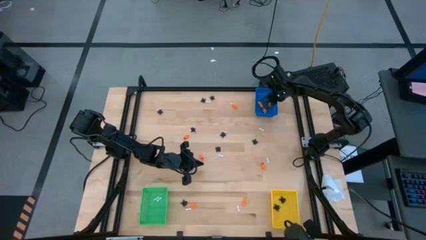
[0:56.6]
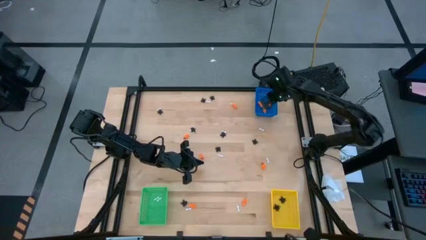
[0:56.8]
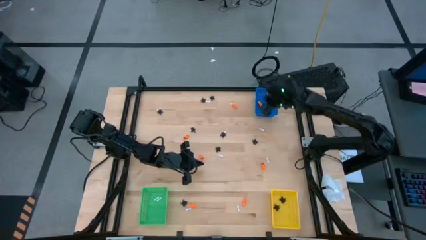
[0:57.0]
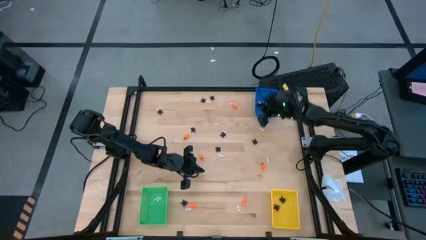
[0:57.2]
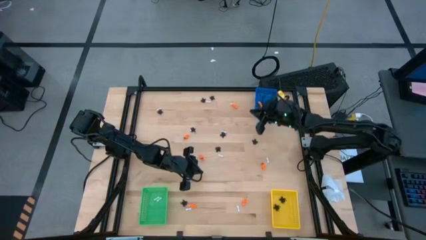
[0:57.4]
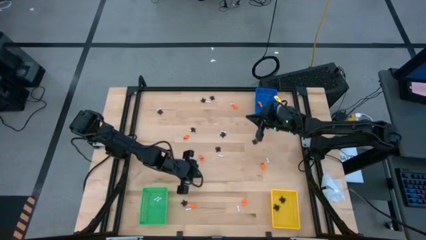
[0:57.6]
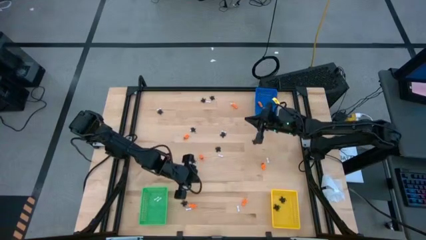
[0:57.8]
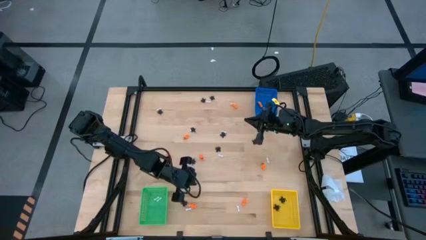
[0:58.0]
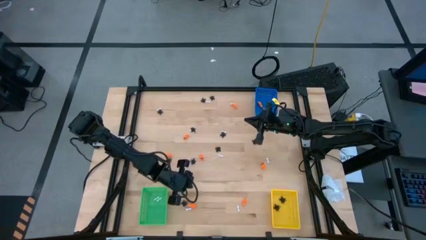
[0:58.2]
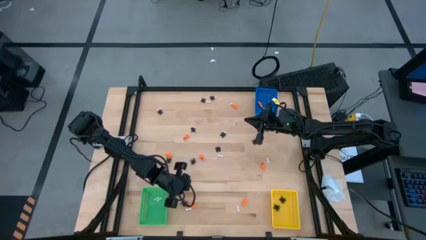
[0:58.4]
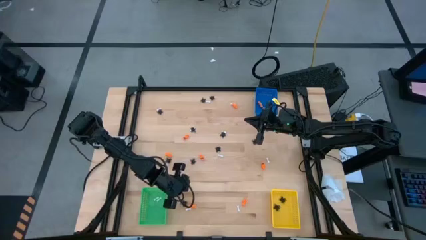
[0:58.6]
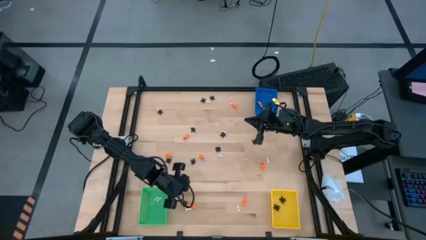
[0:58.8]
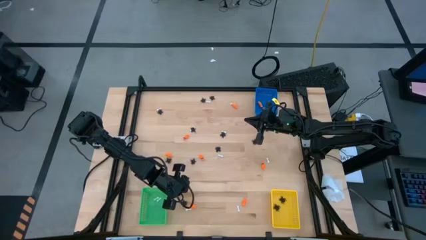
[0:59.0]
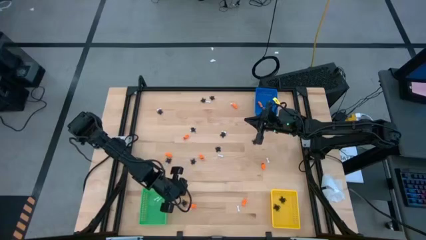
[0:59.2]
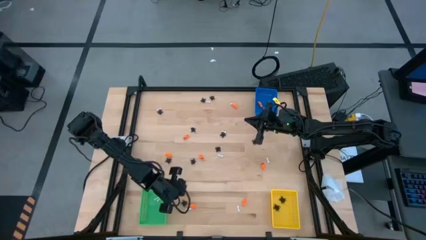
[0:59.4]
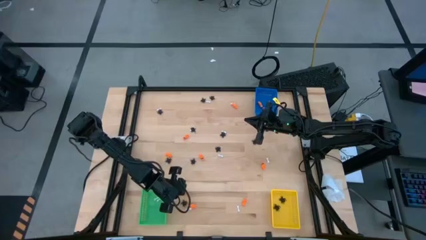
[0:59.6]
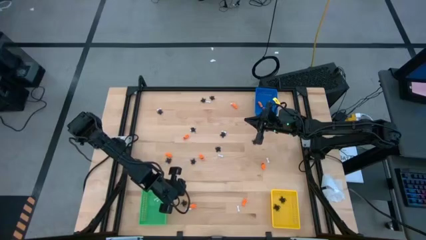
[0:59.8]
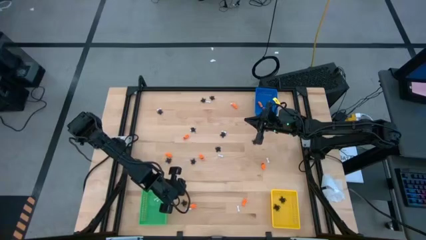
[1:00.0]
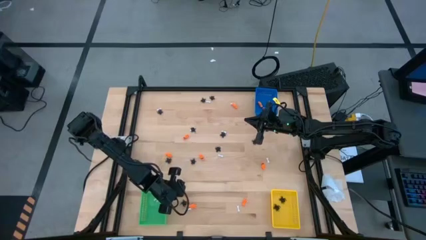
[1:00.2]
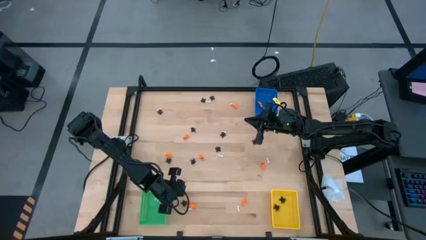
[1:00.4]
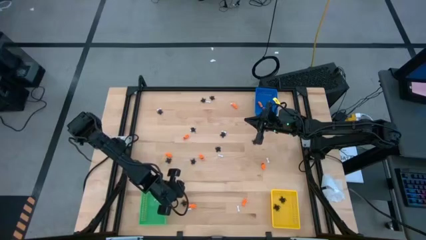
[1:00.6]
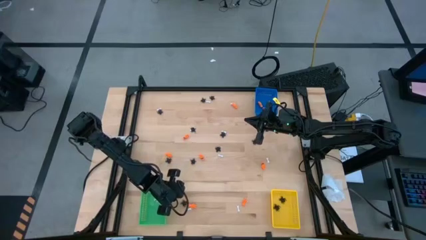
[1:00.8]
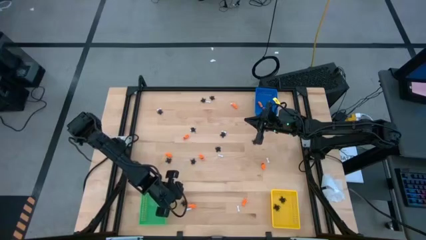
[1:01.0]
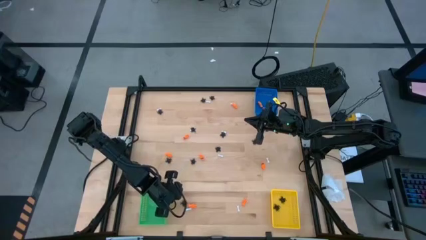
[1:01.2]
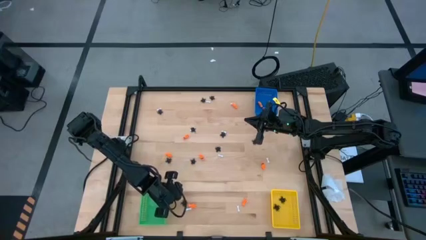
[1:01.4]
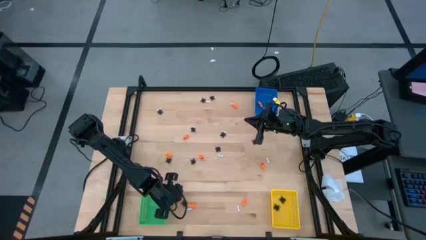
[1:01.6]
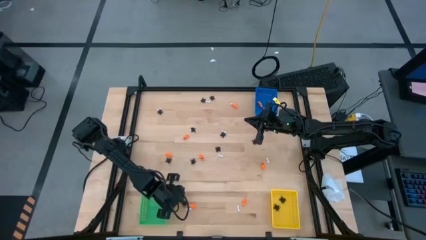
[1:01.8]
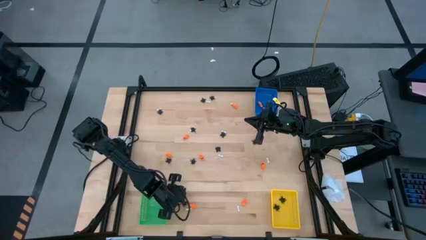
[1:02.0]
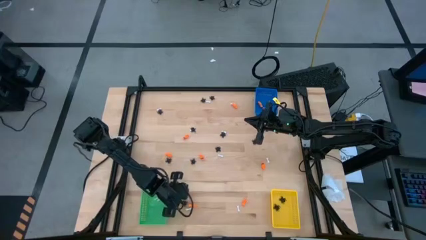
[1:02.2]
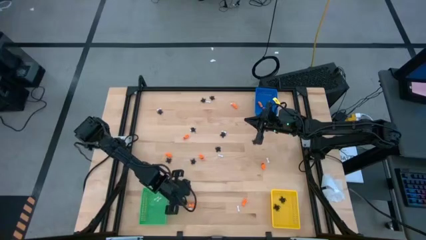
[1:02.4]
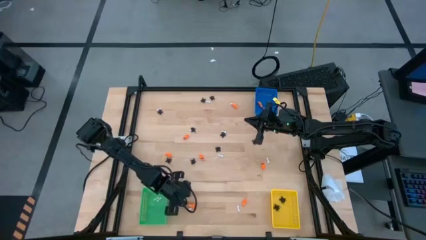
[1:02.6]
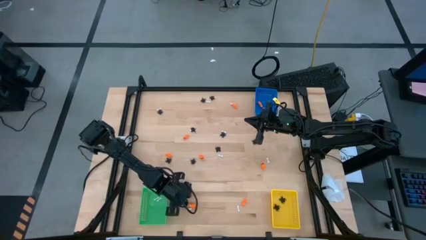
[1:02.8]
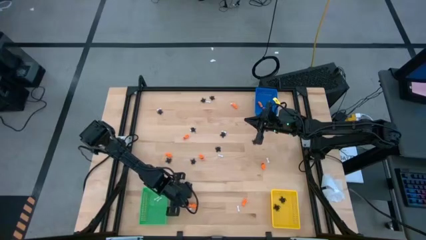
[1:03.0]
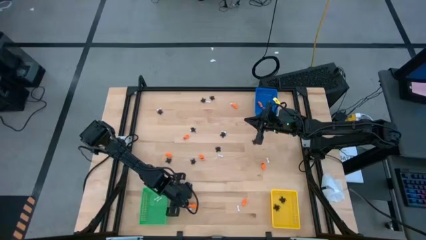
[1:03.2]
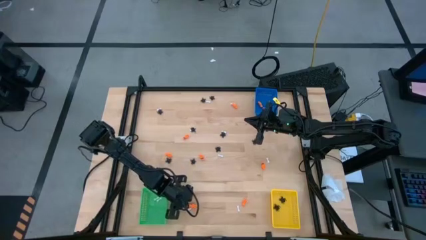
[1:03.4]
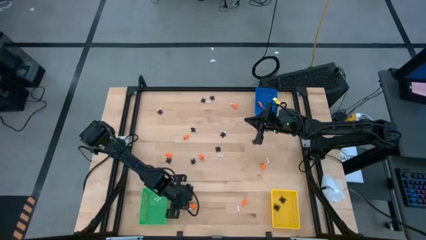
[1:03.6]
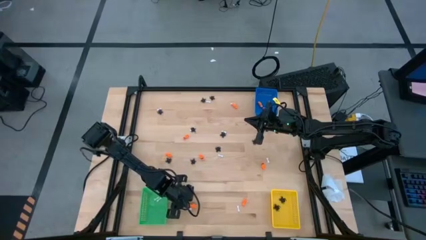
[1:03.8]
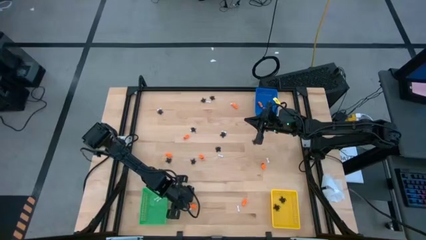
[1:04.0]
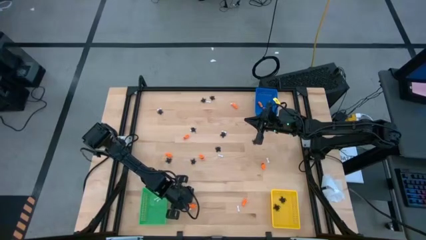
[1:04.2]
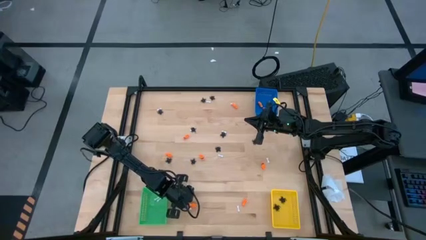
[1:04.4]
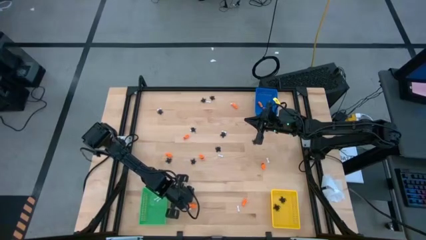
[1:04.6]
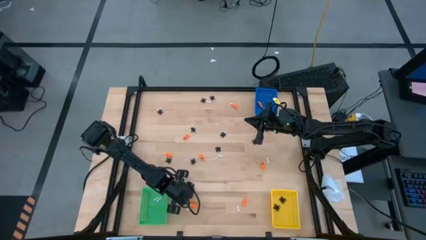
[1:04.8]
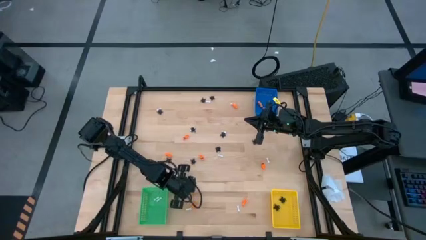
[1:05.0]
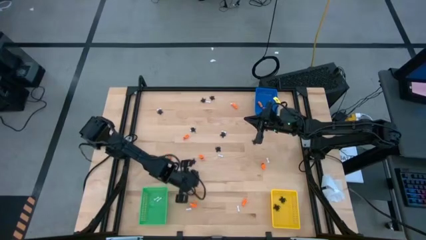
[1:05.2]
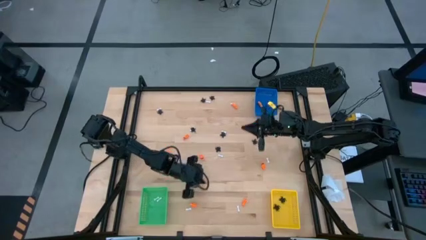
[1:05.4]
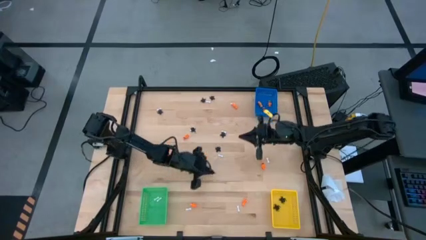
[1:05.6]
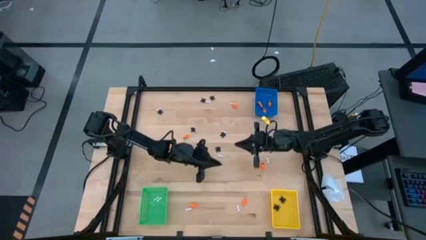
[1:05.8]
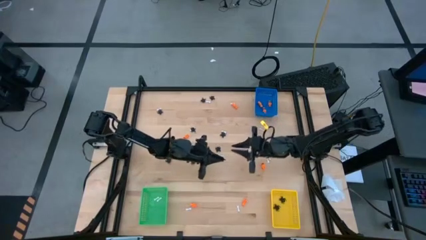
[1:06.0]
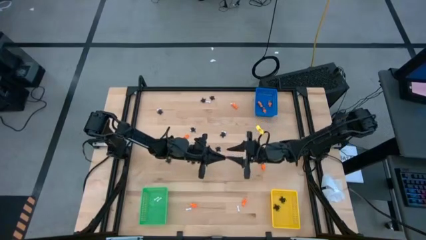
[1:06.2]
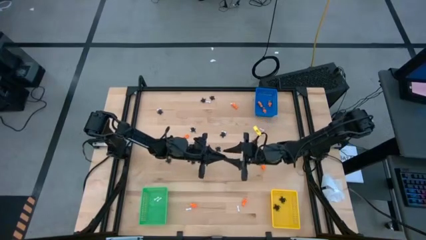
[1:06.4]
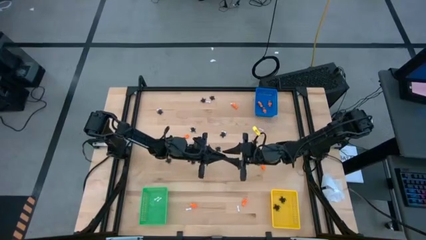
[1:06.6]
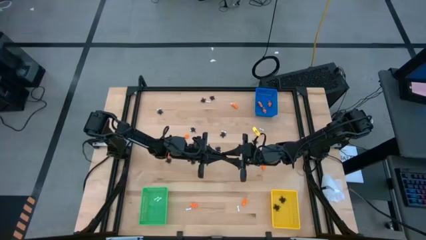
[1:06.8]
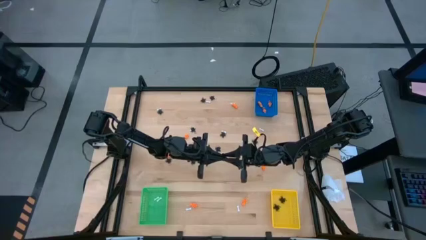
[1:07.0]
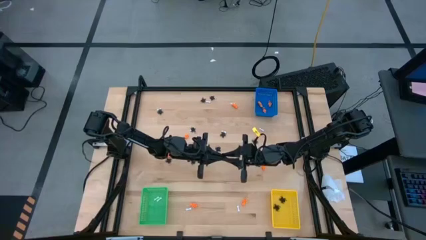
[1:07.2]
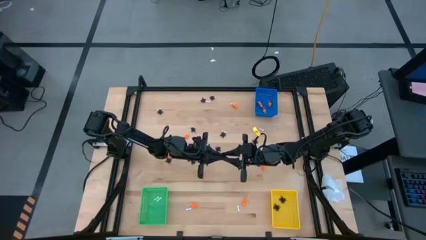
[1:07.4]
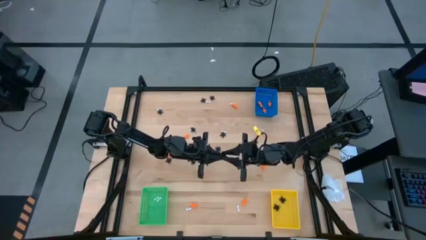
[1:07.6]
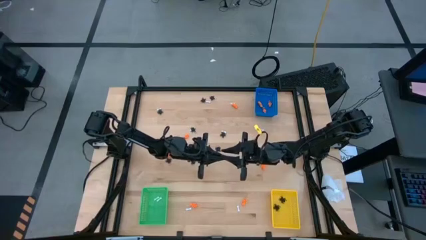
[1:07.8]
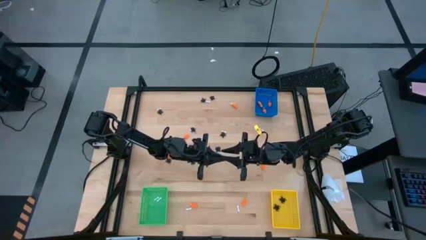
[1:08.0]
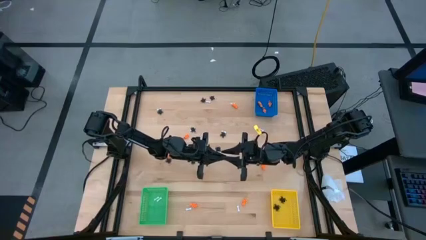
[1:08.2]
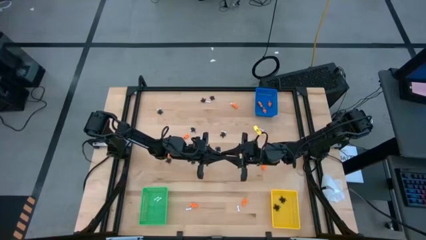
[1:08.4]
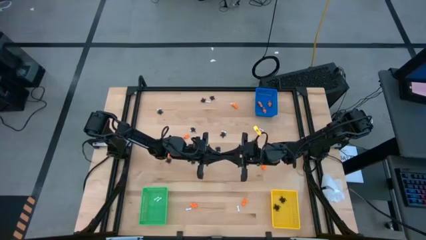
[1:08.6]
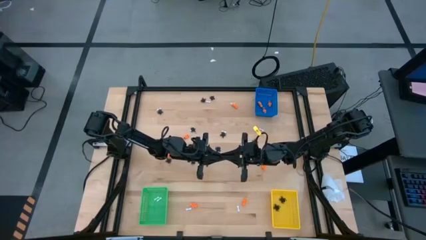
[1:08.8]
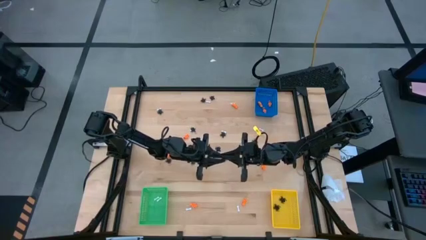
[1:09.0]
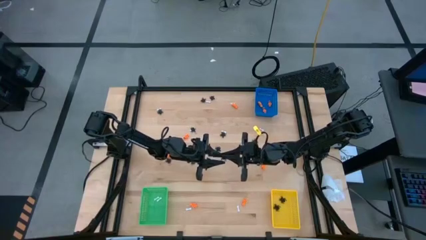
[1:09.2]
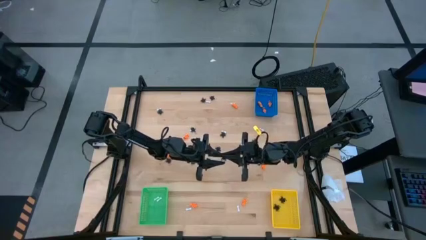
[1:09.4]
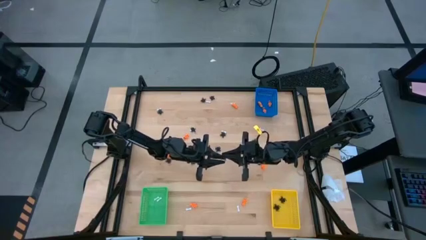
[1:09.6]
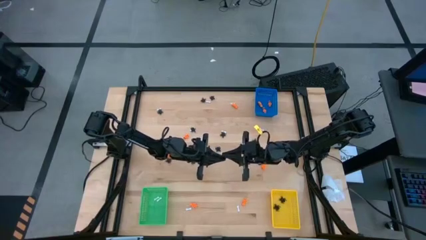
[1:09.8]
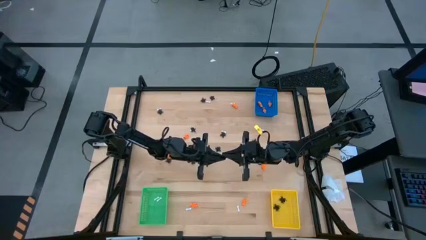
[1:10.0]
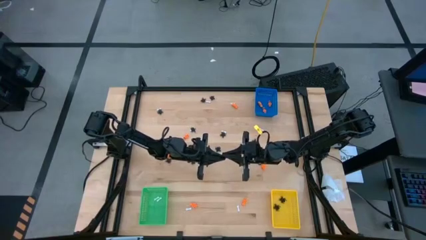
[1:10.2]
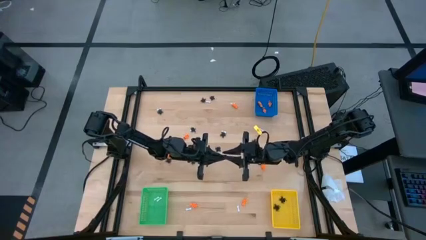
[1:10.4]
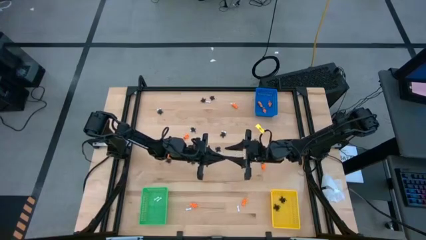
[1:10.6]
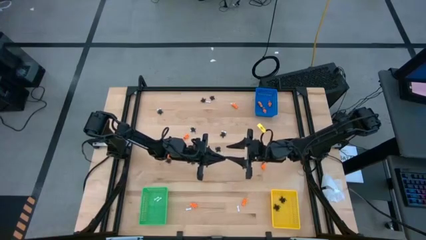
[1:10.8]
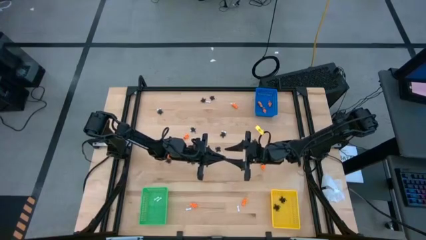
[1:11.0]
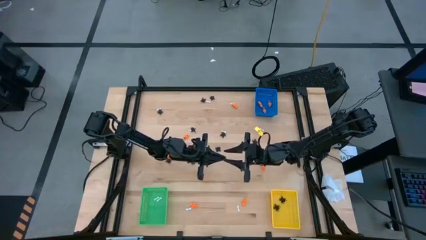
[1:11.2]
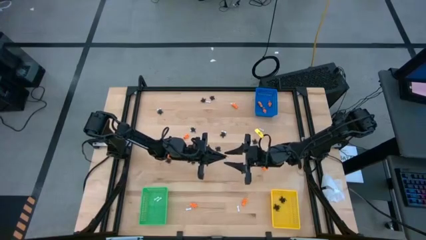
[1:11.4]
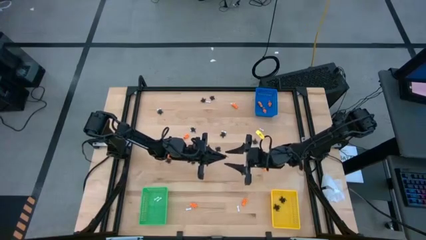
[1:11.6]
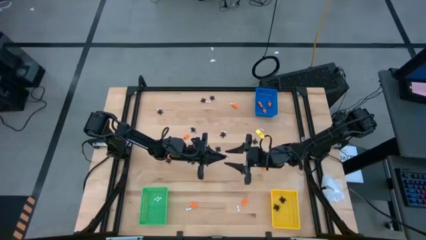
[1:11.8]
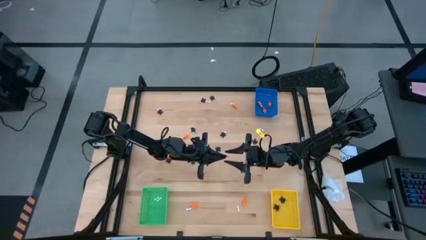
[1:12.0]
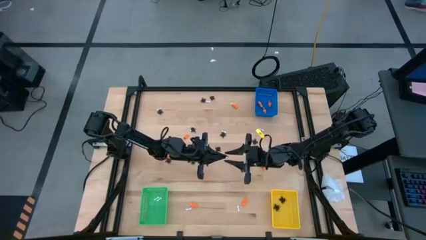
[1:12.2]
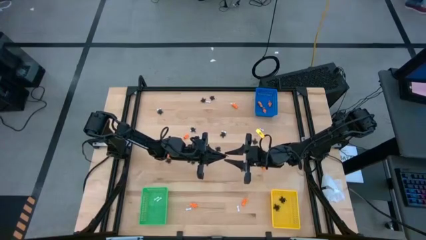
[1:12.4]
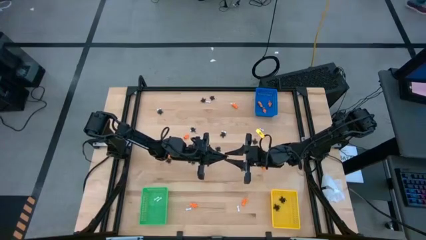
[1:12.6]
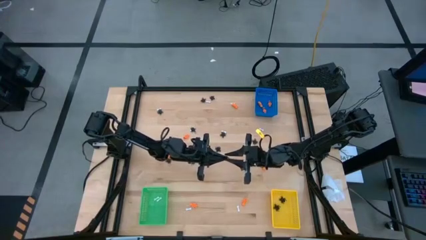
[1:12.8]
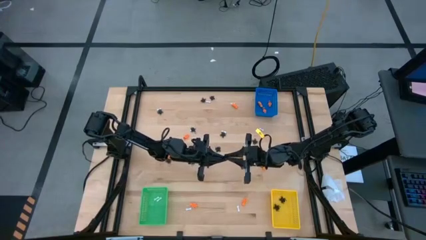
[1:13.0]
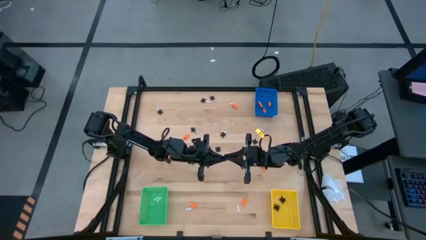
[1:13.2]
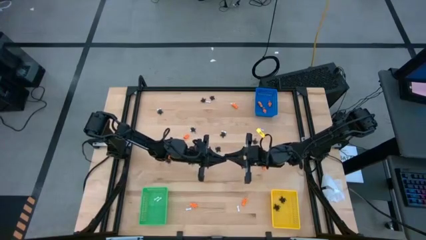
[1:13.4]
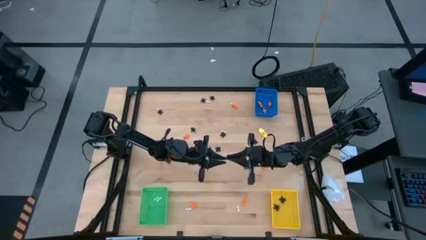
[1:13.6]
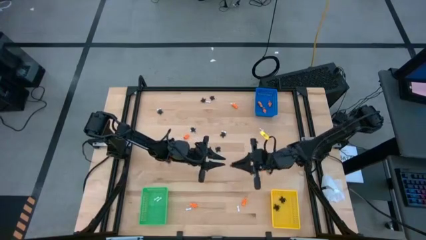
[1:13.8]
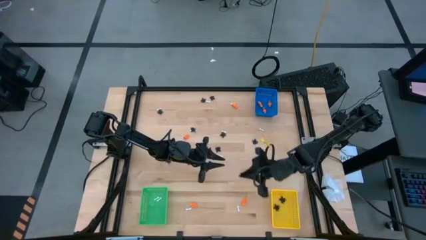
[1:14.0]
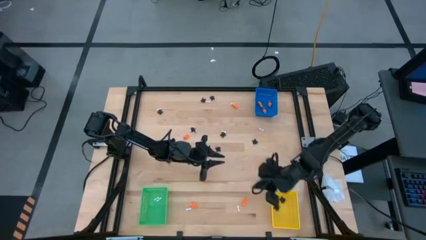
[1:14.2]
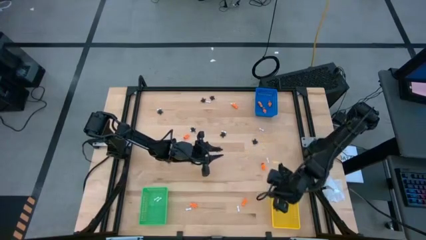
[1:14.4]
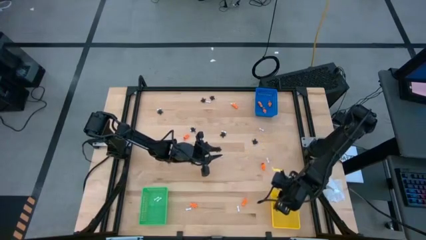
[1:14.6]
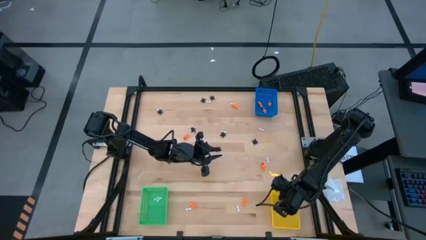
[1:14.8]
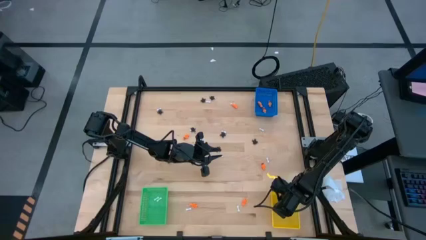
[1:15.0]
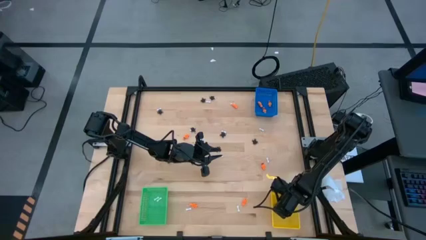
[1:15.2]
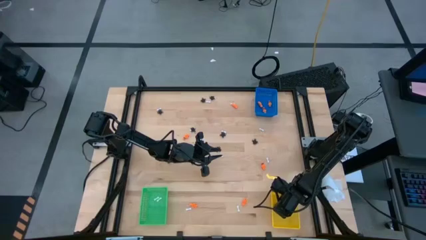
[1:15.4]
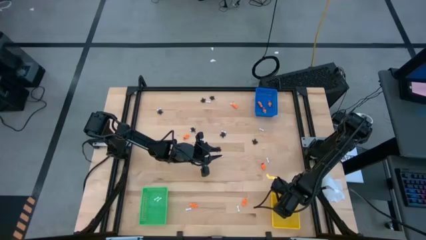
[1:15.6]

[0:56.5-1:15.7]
Task: Sort Halloween decoration
Put the black spider toy into the yellow bin
